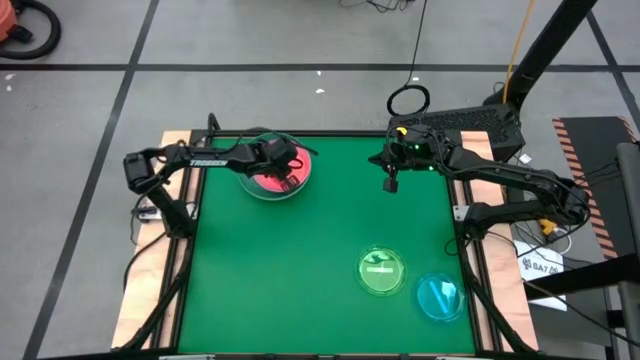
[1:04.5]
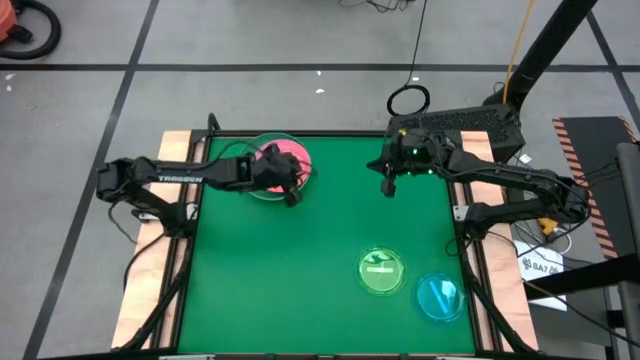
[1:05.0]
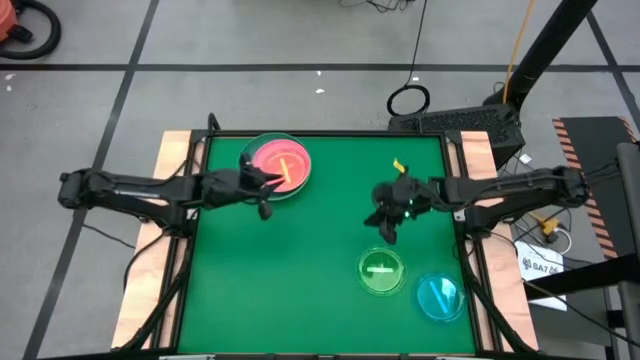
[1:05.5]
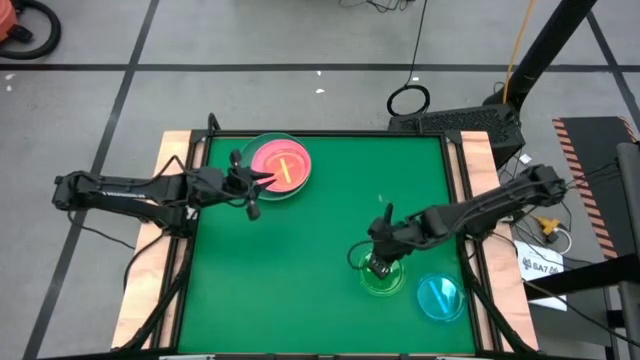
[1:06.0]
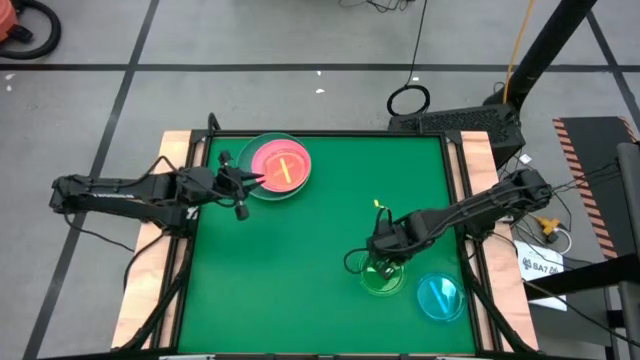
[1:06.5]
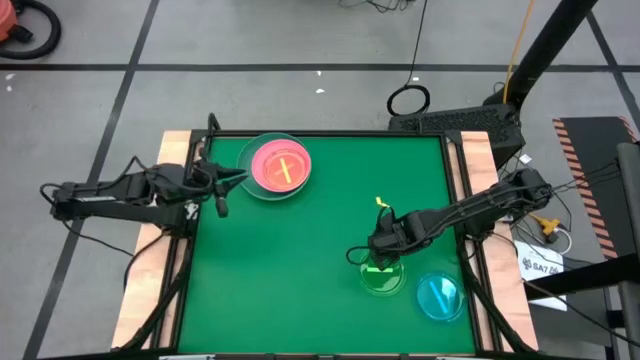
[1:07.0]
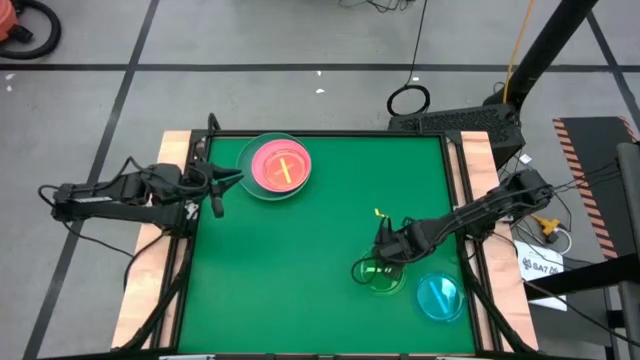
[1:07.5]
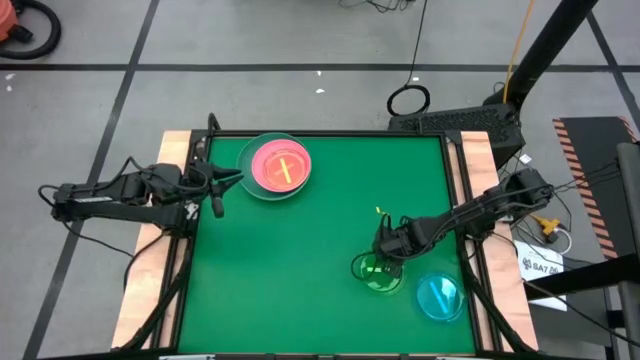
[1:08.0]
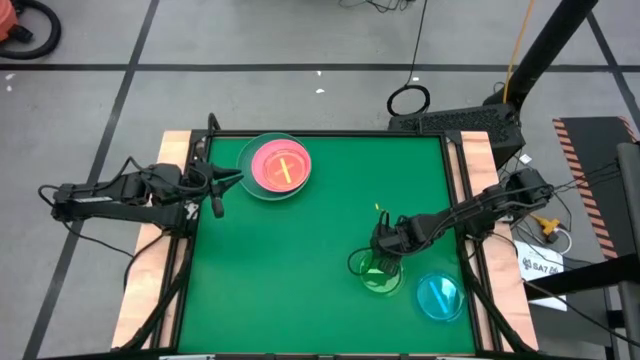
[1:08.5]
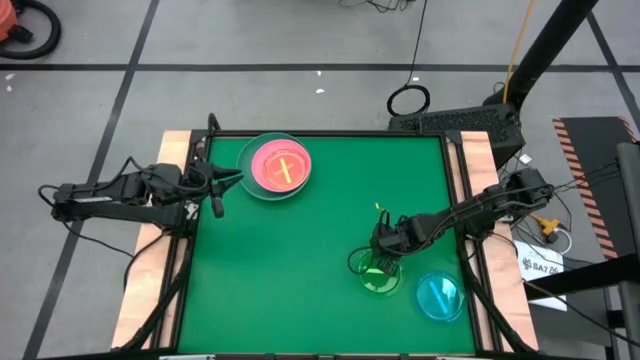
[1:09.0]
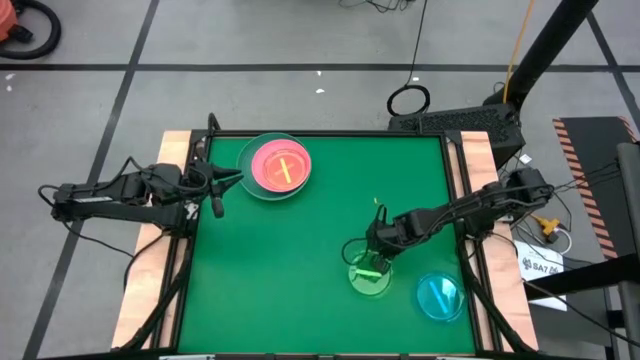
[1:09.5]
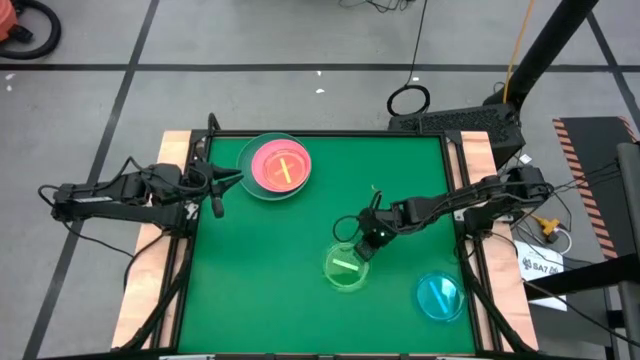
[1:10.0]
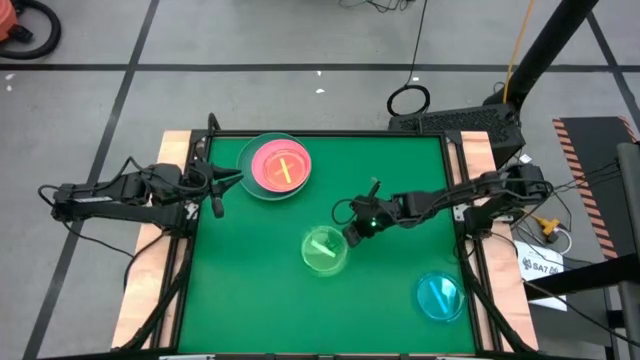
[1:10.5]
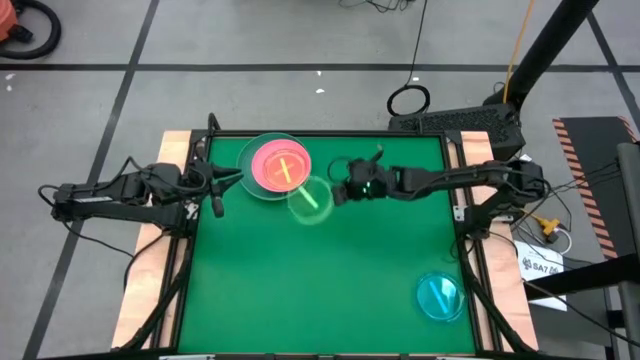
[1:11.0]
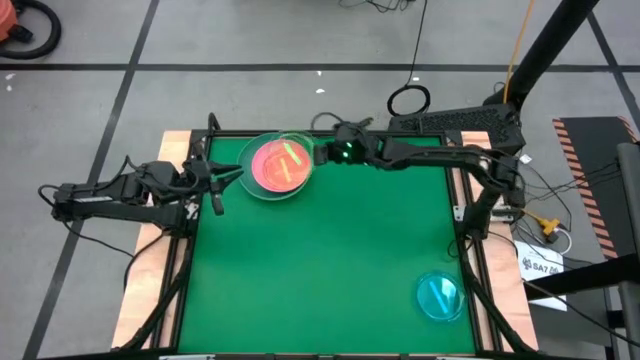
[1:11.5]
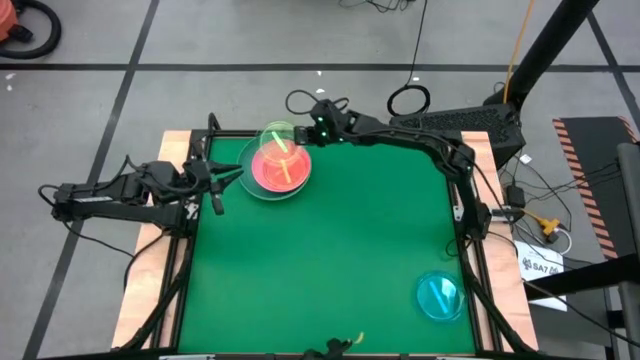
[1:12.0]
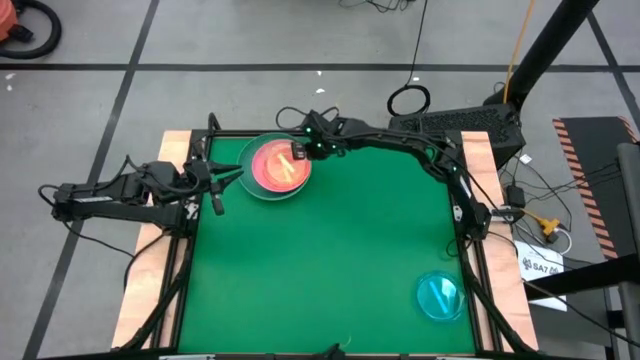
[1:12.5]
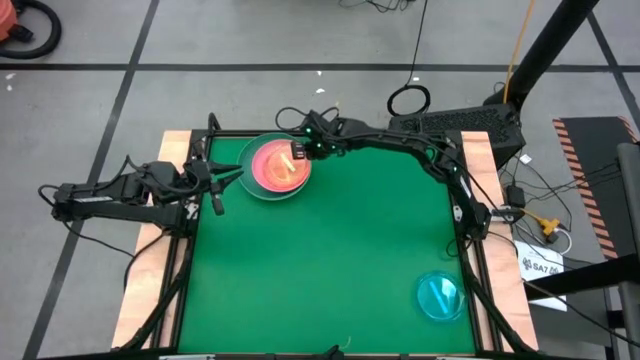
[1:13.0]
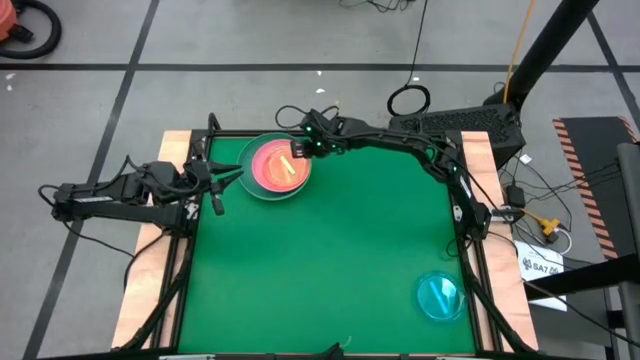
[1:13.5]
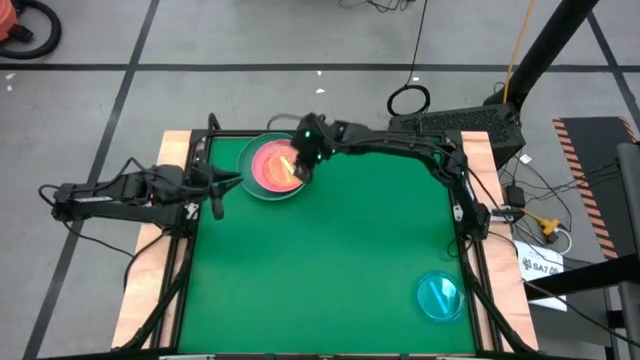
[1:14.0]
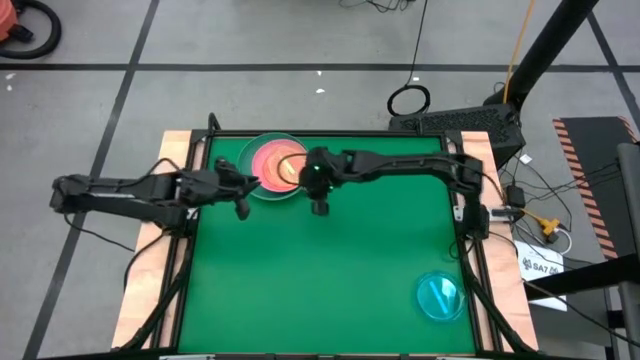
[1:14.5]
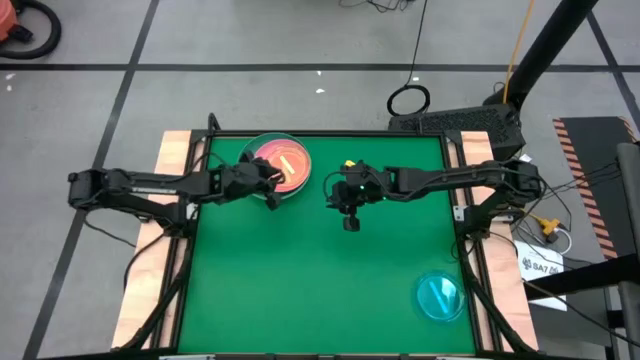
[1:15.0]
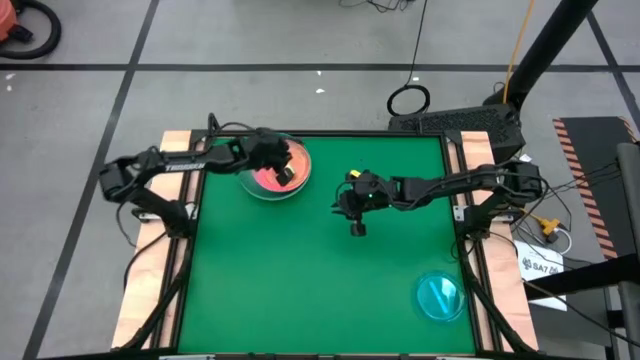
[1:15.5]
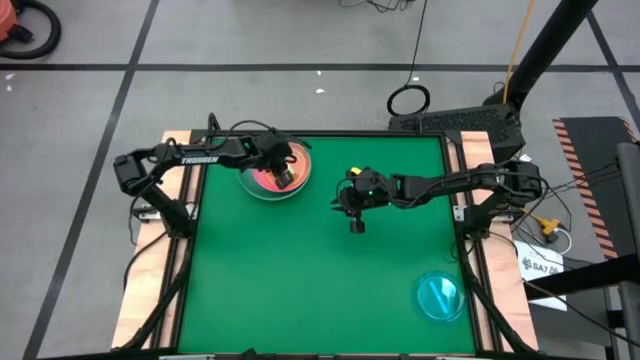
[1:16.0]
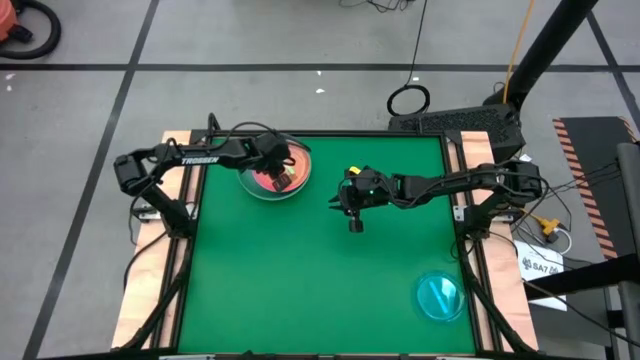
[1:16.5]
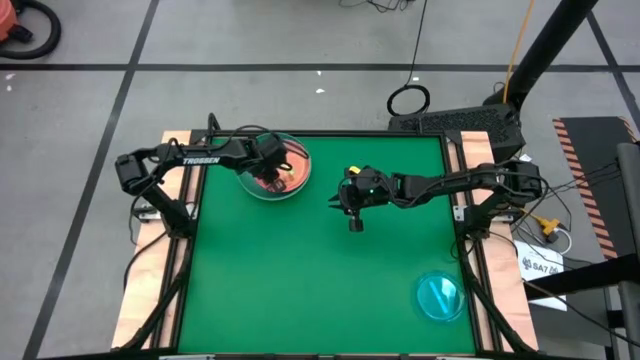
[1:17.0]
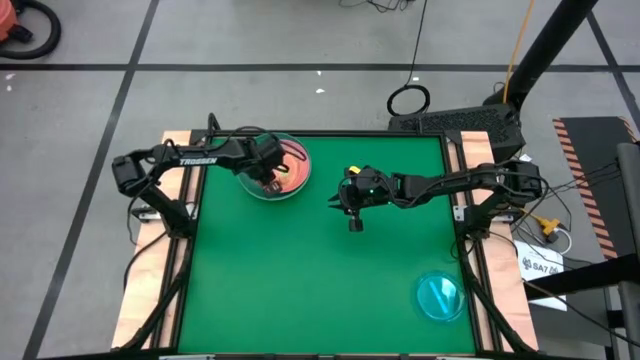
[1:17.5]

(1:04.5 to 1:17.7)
Task: Stack plastic plates
Stack the green plate on top of the orange plate

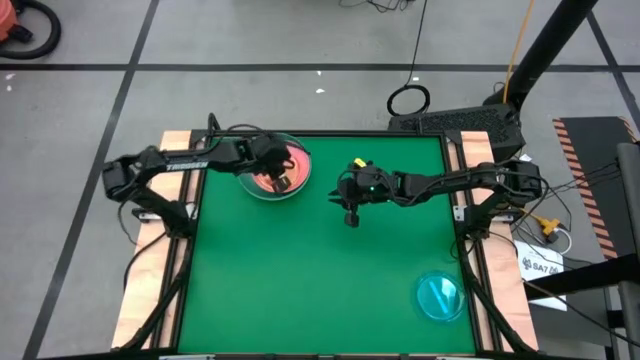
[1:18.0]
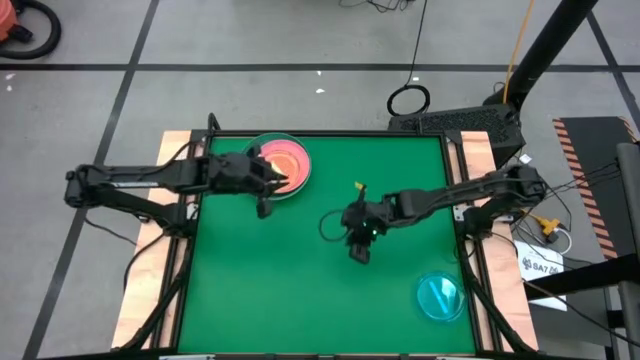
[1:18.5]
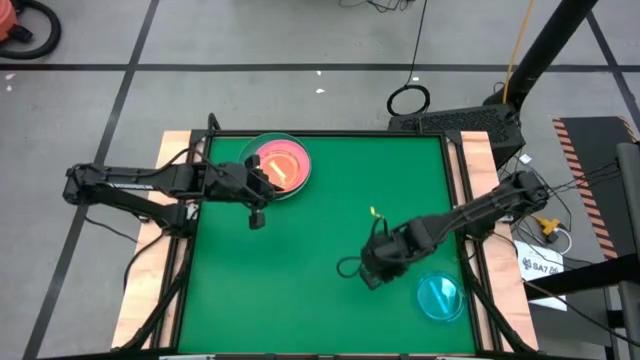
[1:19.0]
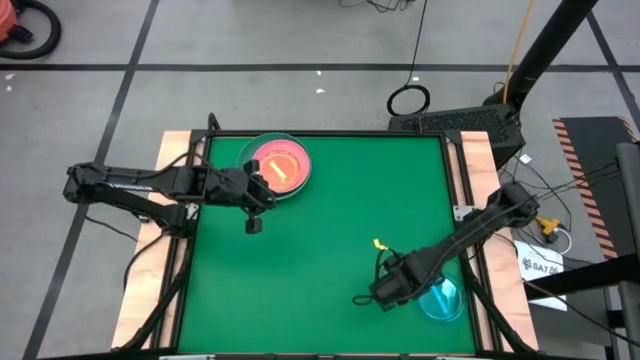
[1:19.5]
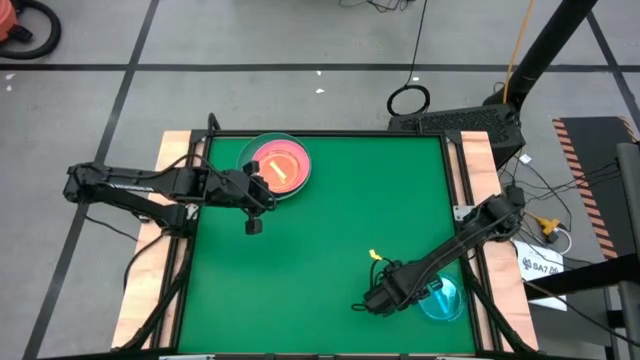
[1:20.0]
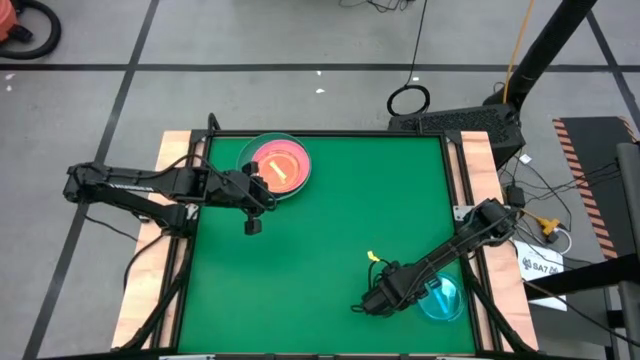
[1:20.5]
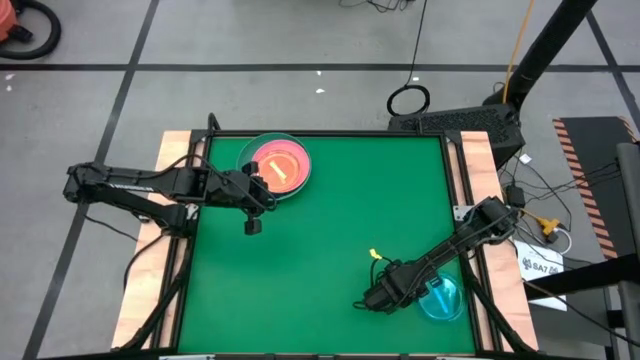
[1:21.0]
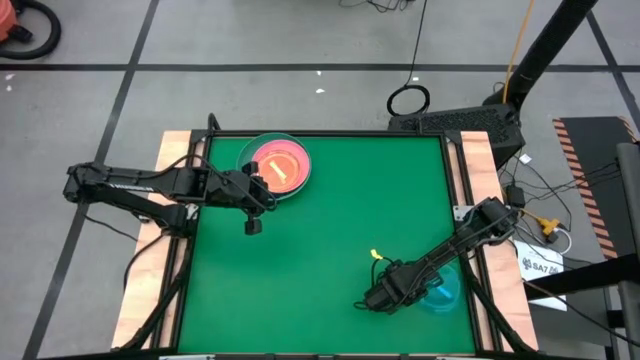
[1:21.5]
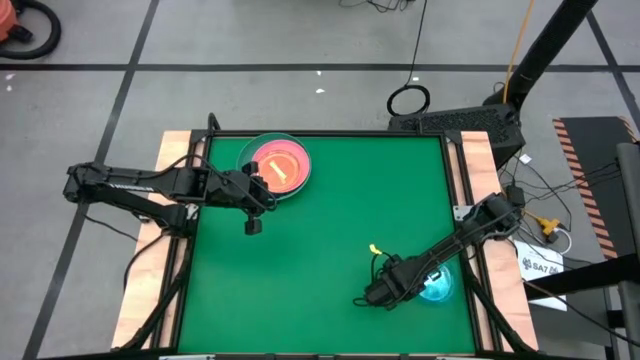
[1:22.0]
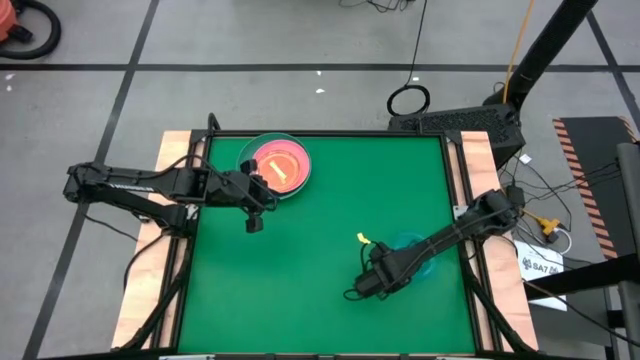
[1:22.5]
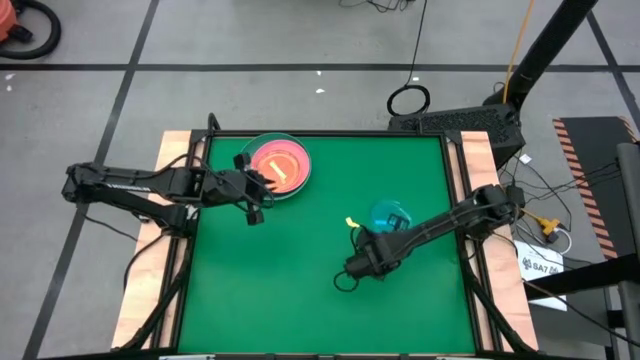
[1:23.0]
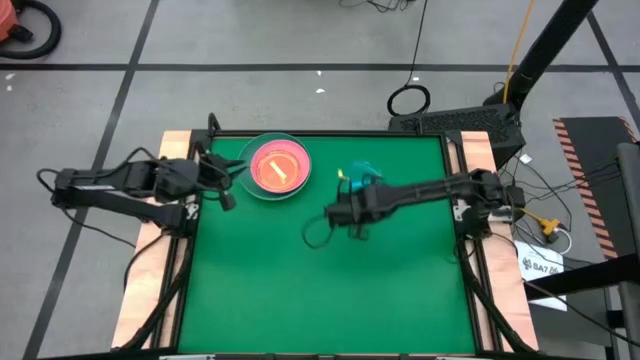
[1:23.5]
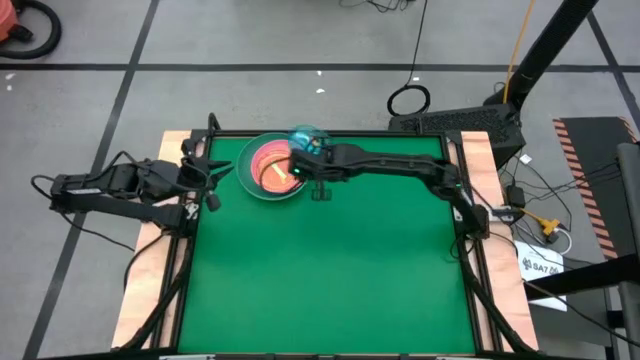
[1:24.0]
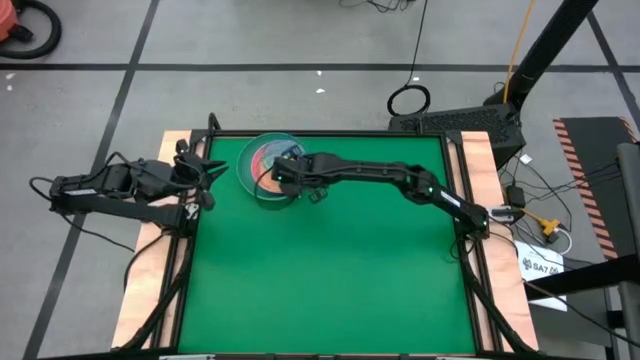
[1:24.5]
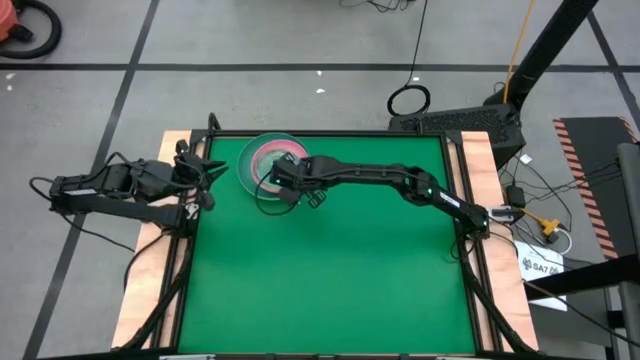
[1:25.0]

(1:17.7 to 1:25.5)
Stack the blue plate on top of the green plate

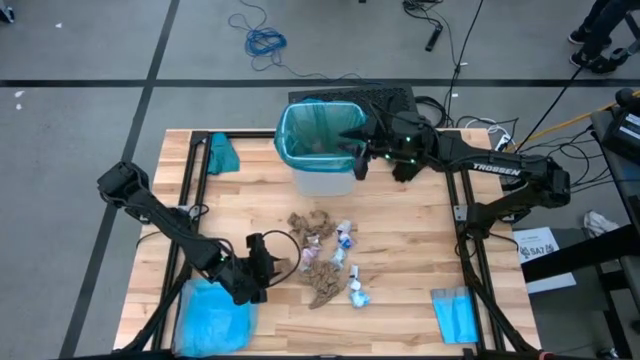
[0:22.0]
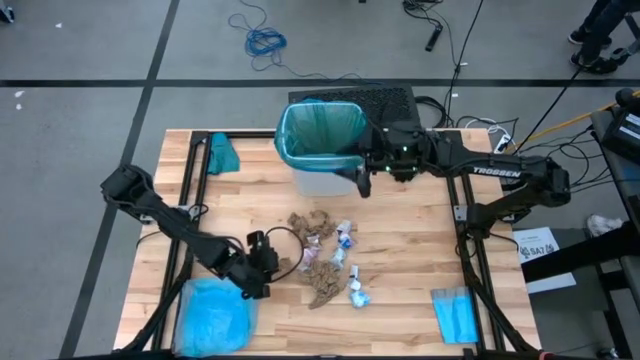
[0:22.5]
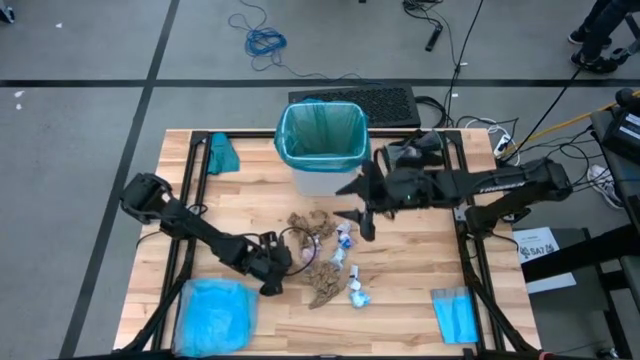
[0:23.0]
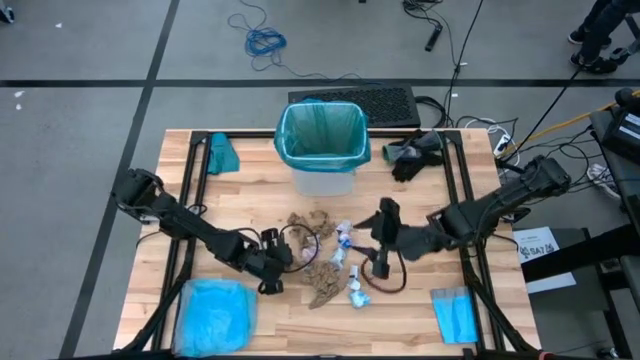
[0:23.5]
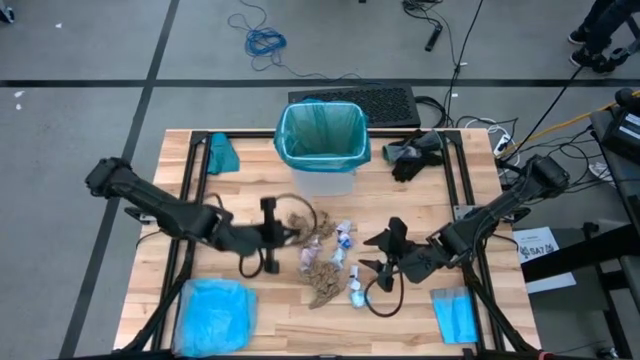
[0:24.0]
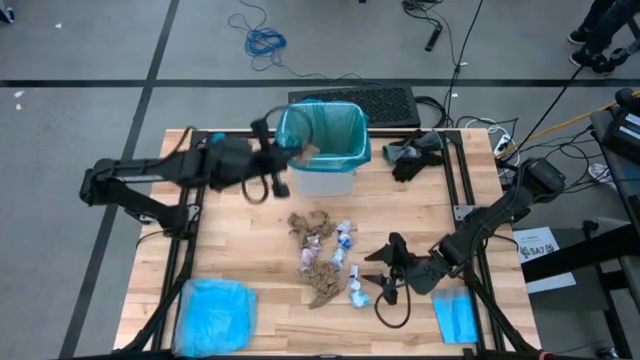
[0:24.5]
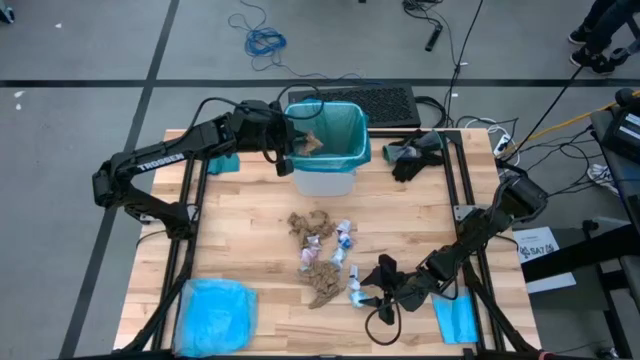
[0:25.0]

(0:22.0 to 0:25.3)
Task: place trash/remove bag and relplace
Put the brown napkin into the trash bin
